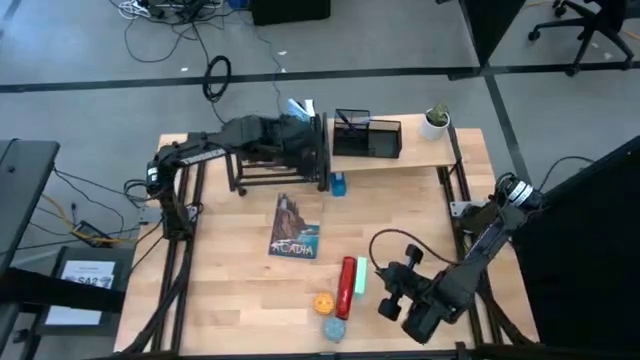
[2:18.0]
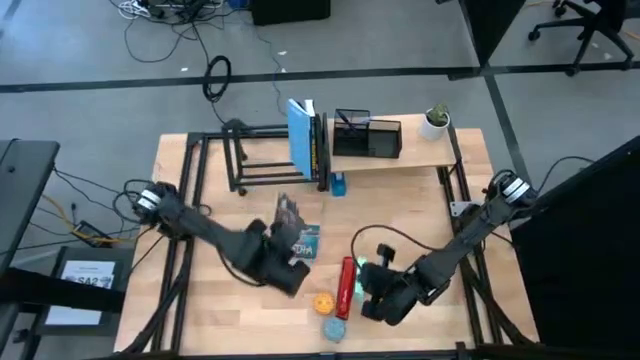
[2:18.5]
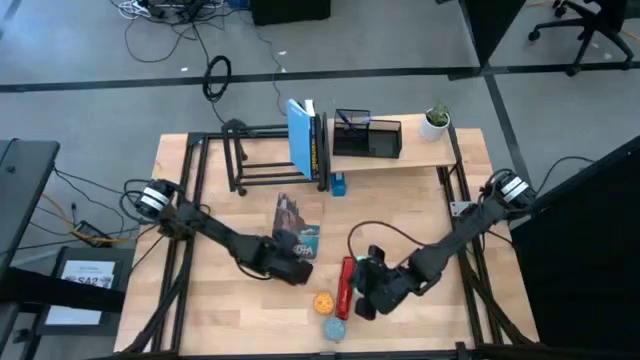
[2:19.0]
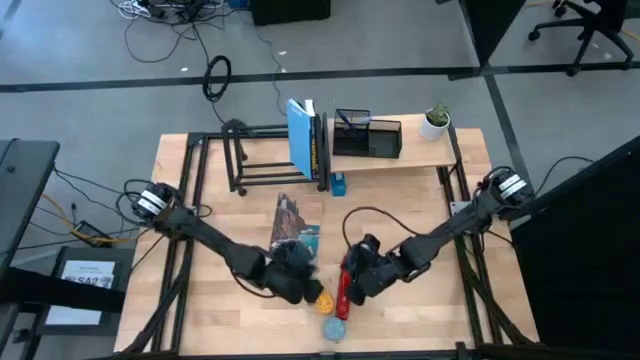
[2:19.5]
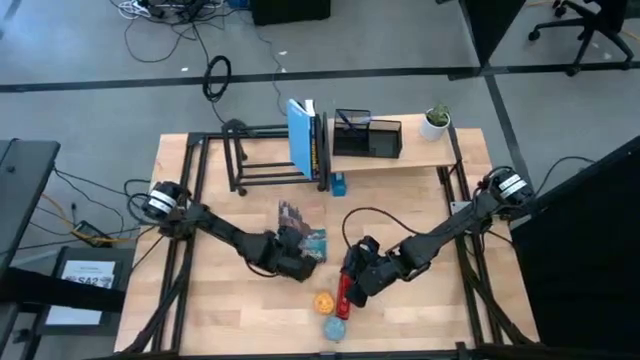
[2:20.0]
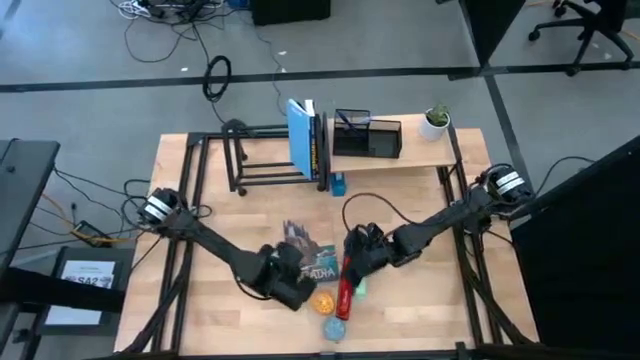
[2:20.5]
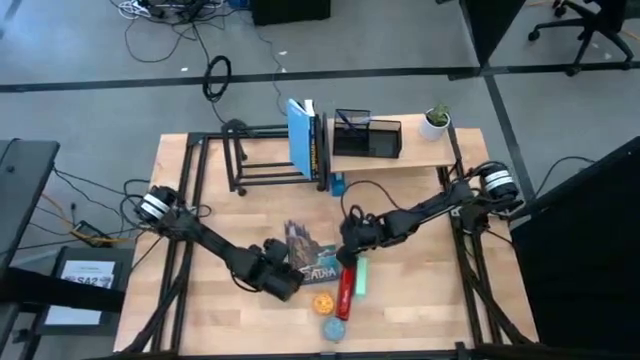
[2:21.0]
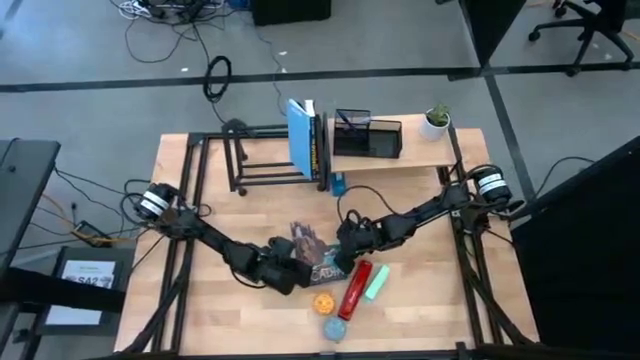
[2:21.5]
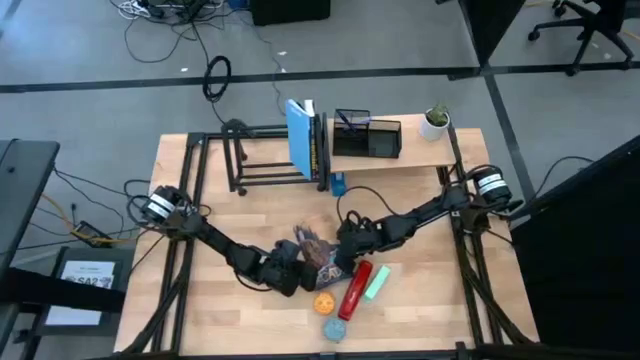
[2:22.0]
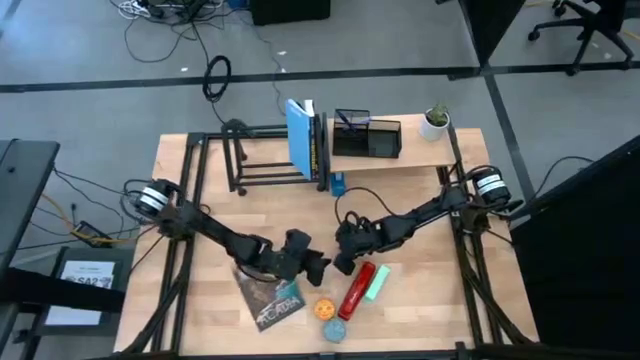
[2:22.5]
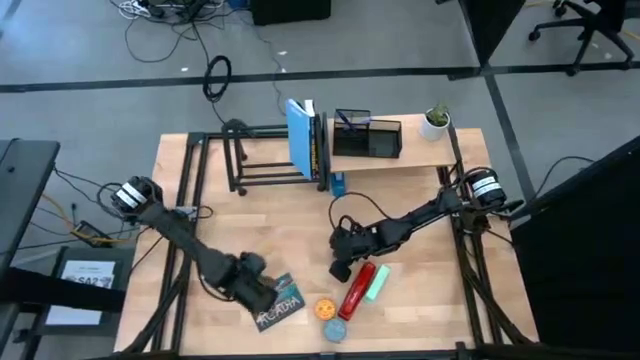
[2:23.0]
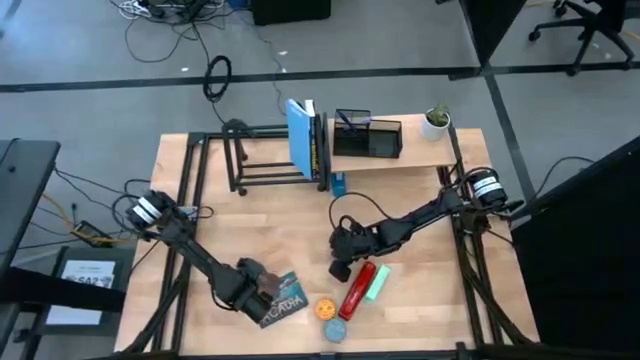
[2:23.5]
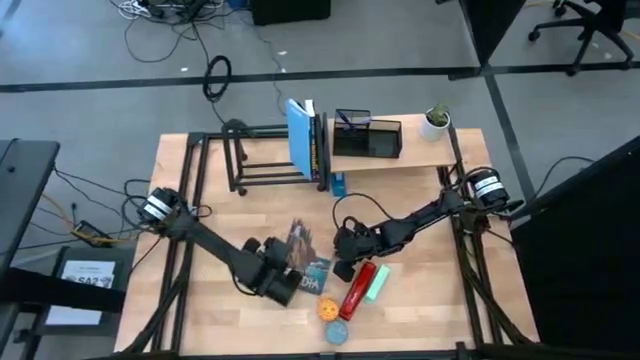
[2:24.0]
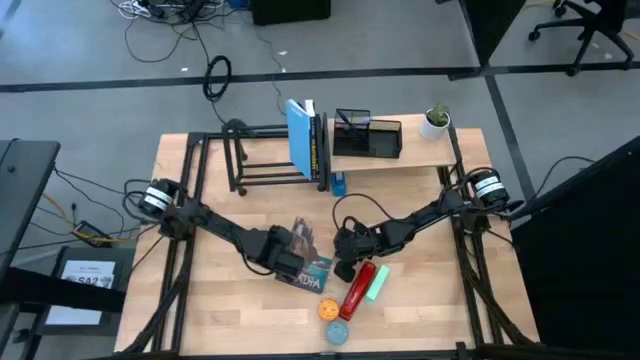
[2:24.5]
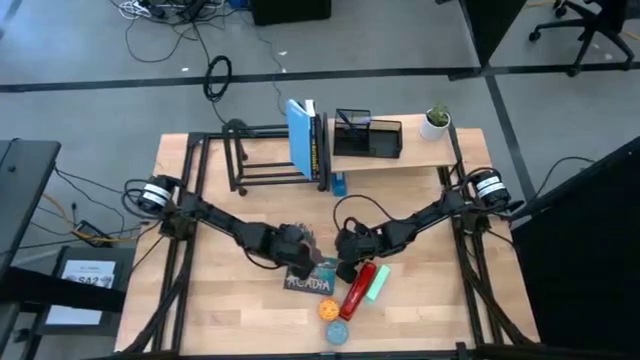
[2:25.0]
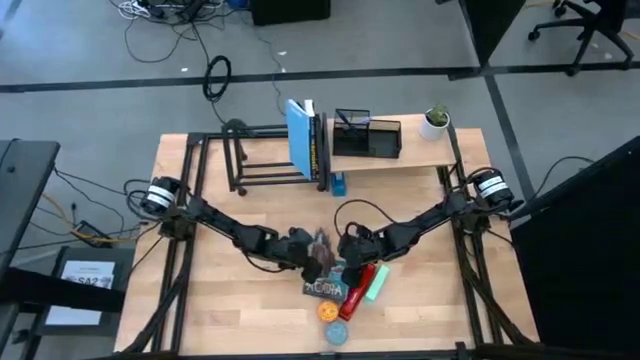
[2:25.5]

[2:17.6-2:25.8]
Task: Stock shelves
Put the brown book on the book shelf

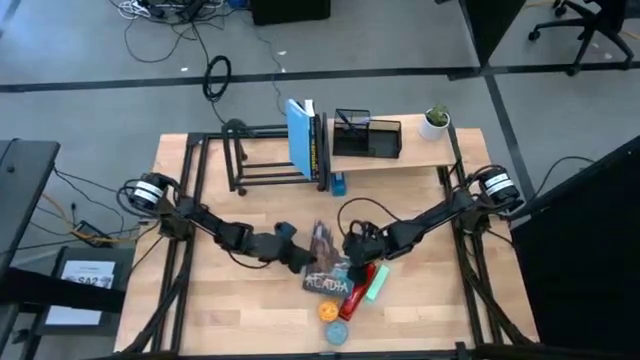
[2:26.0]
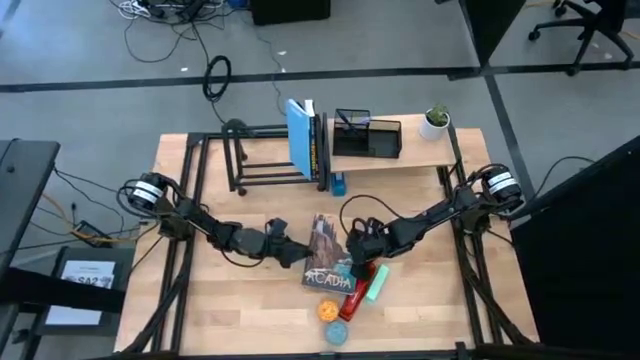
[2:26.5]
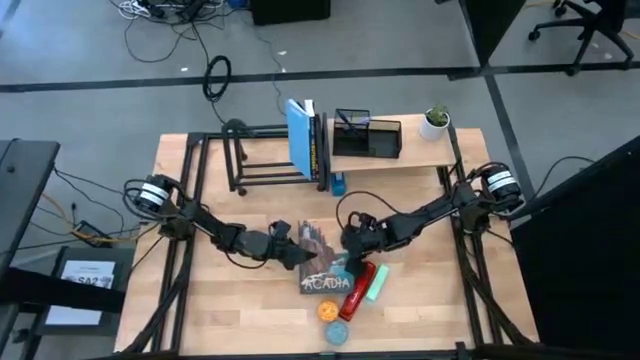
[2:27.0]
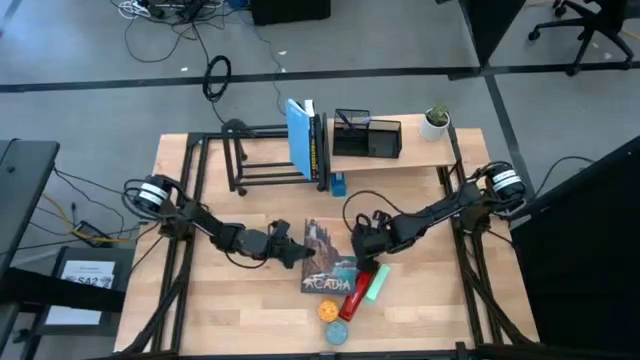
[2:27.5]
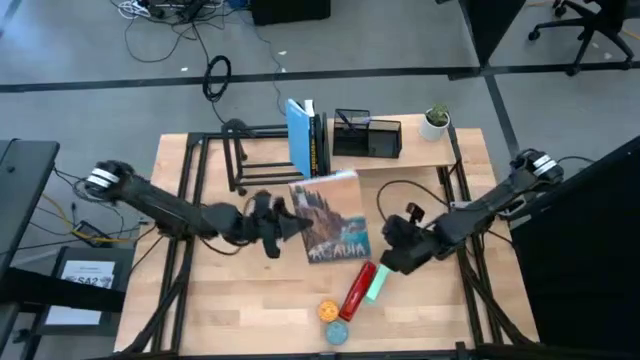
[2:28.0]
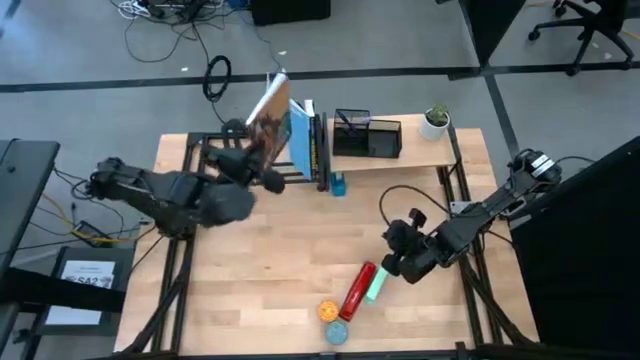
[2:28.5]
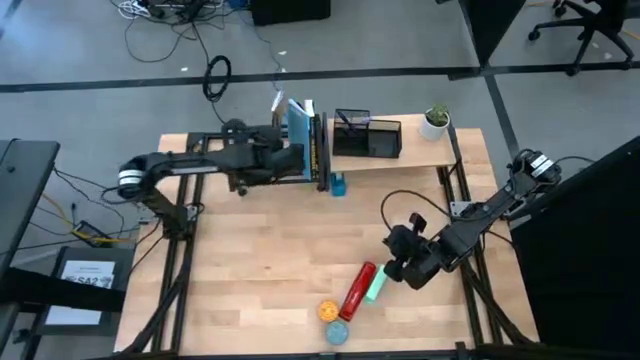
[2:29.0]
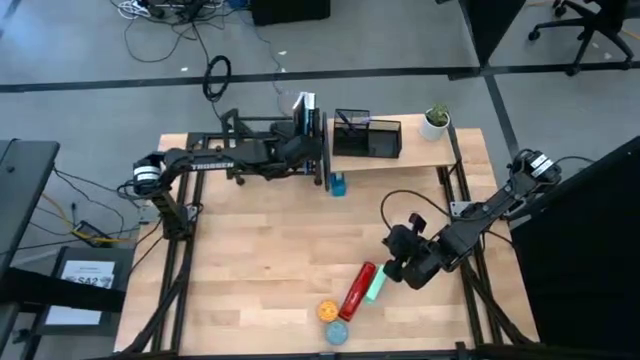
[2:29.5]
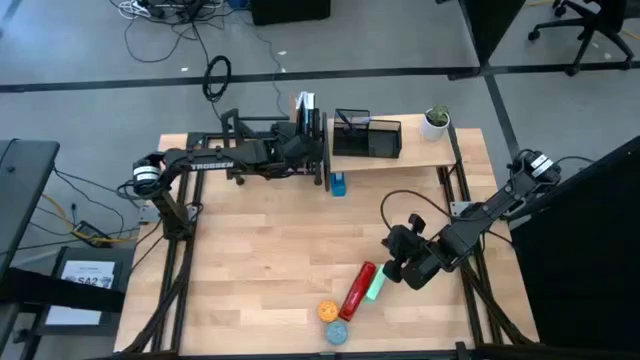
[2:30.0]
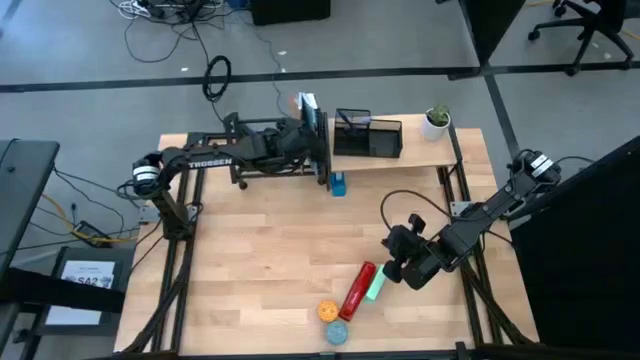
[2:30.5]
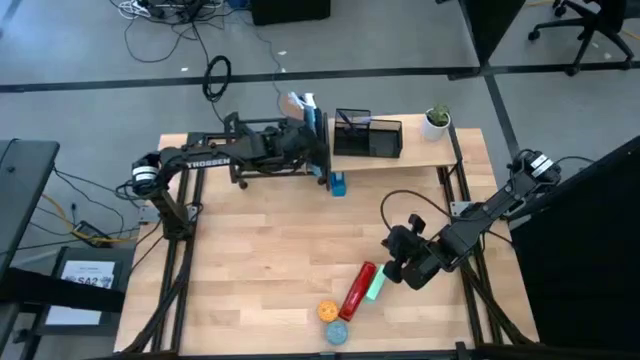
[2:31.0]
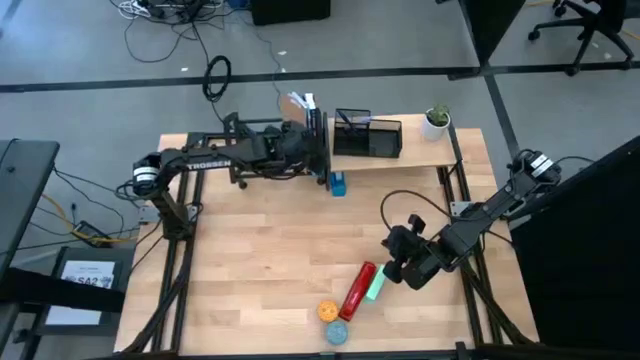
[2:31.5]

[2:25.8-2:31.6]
Put the brown book on the book shelf

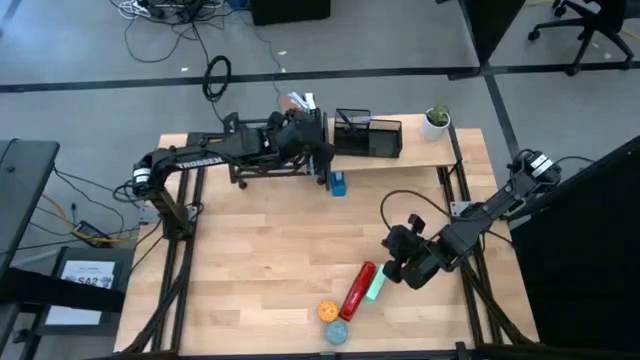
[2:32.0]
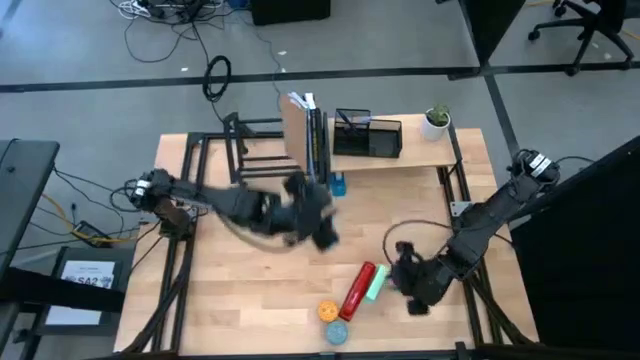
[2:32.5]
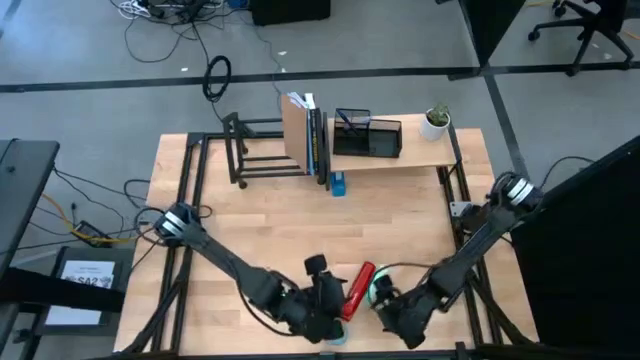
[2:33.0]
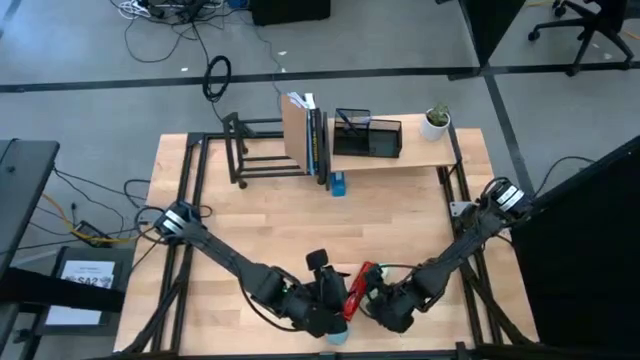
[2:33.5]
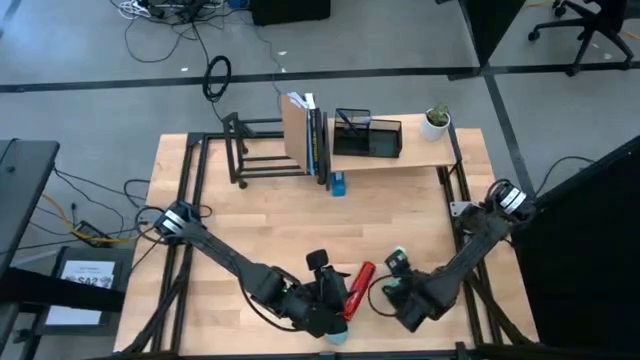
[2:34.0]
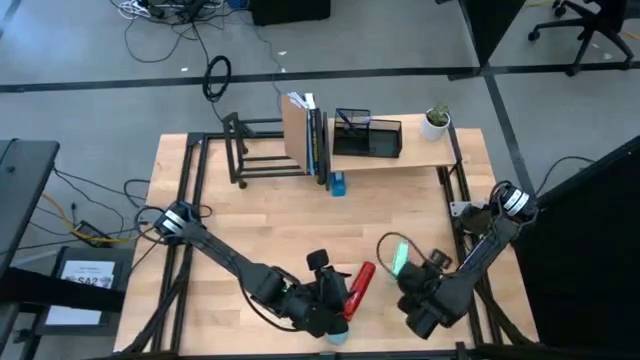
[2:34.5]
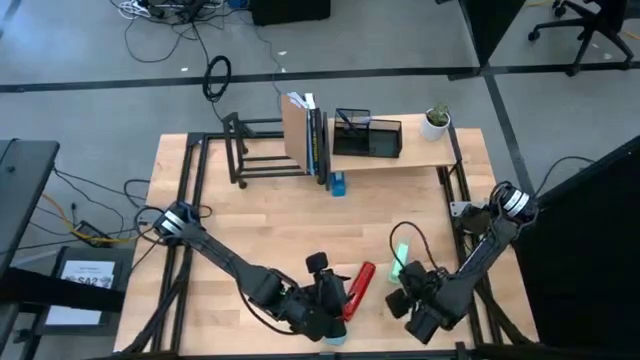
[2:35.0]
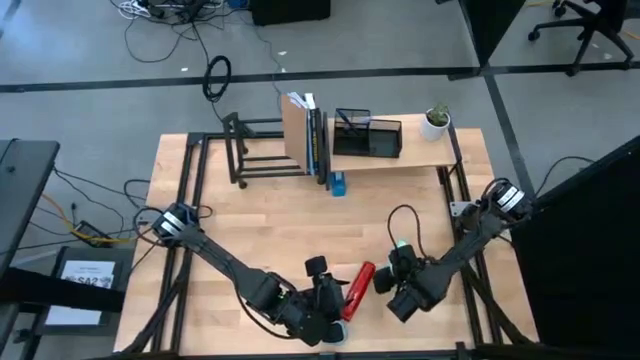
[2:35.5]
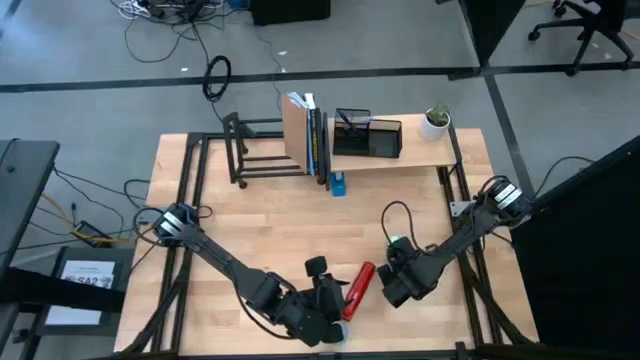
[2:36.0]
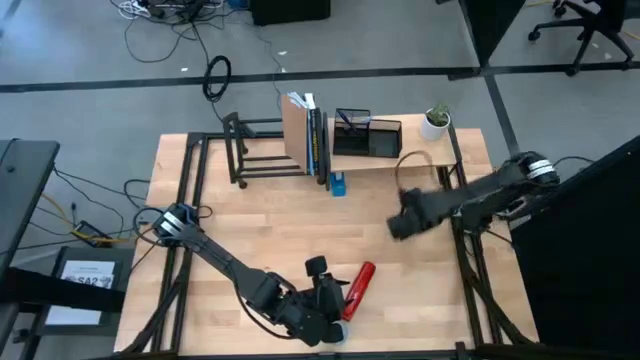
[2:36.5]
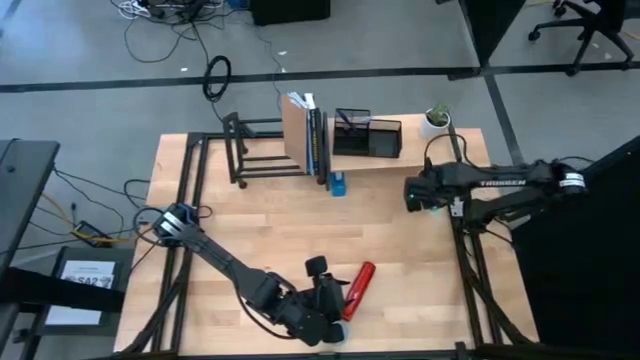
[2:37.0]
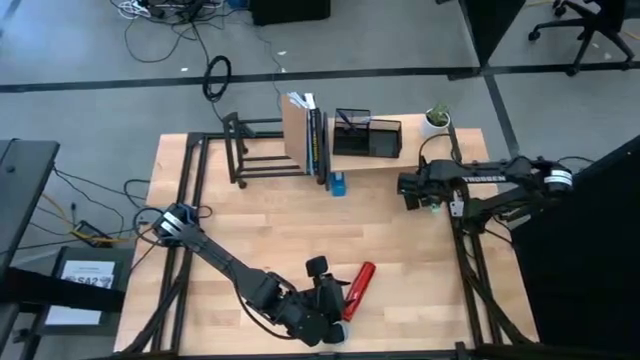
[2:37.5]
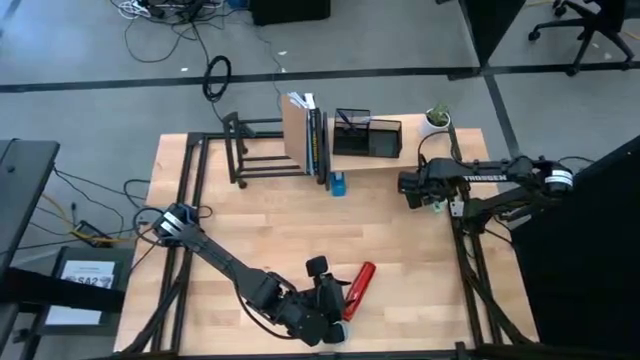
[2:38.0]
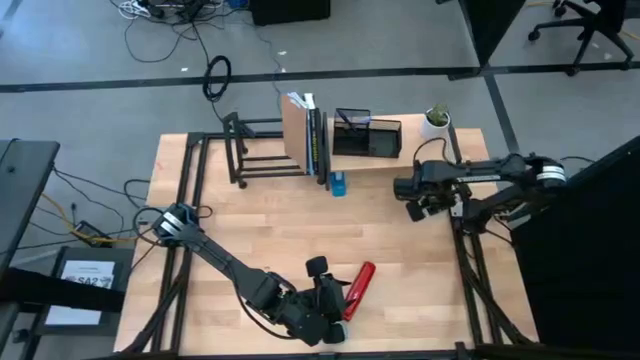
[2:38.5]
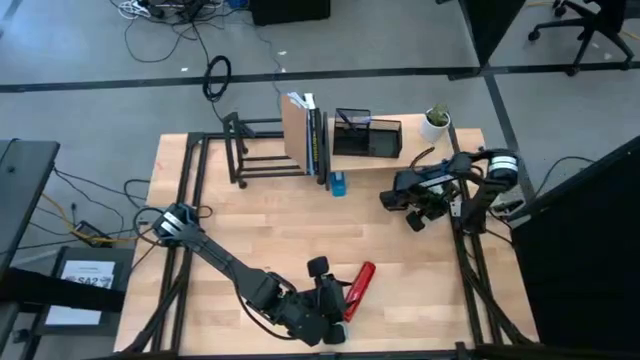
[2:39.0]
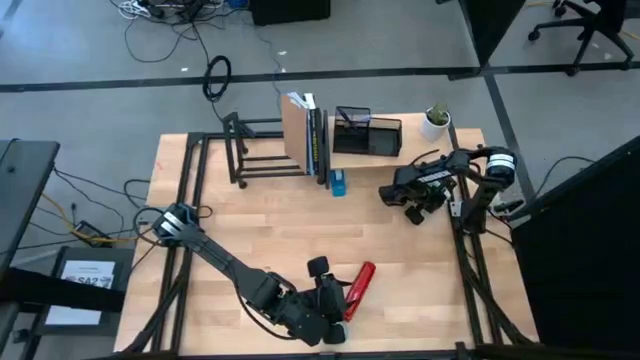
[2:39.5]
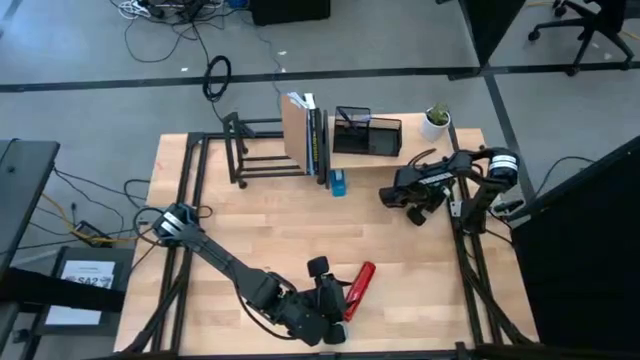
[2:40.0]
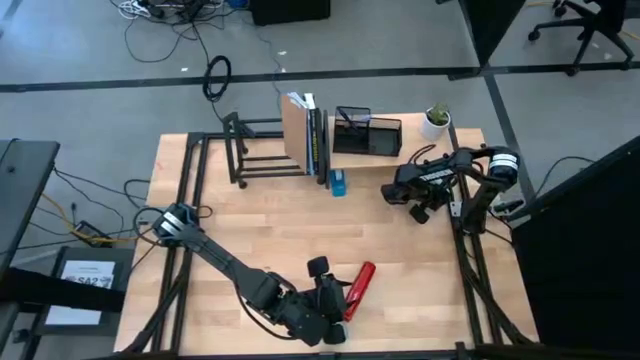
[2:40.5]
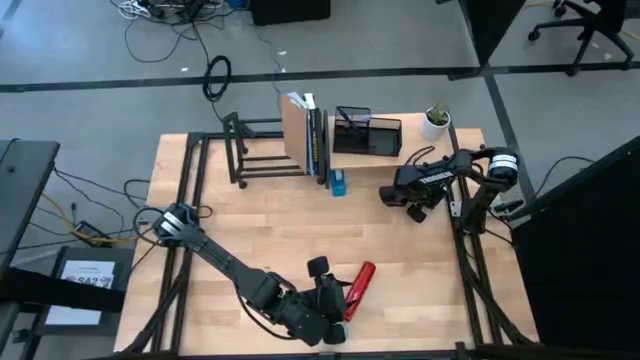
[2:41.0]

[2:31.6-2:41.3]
Put the green stapler under the shelf
